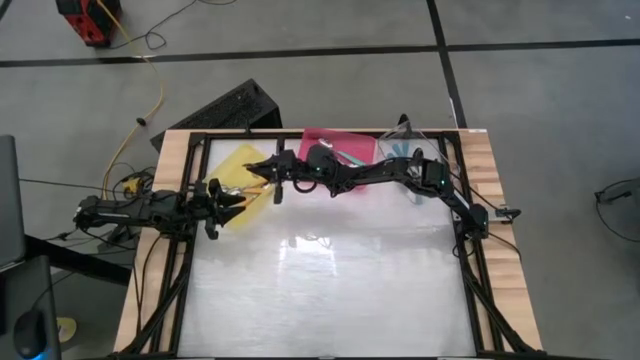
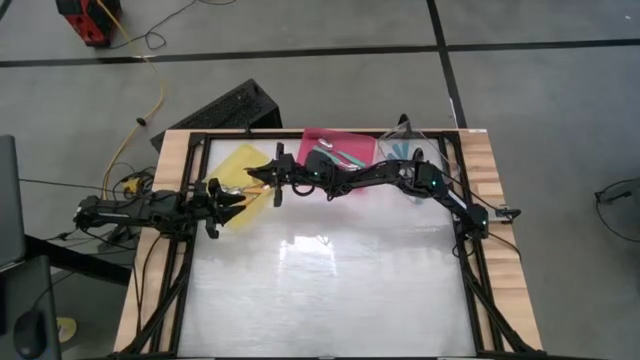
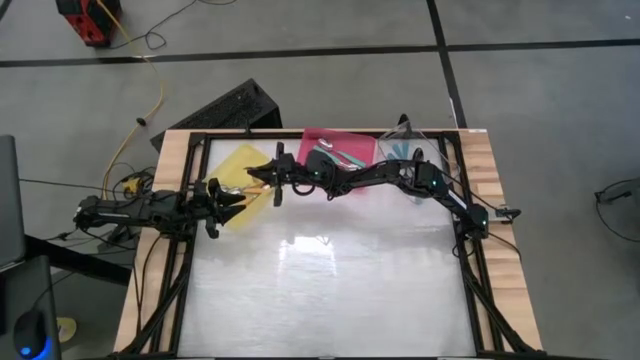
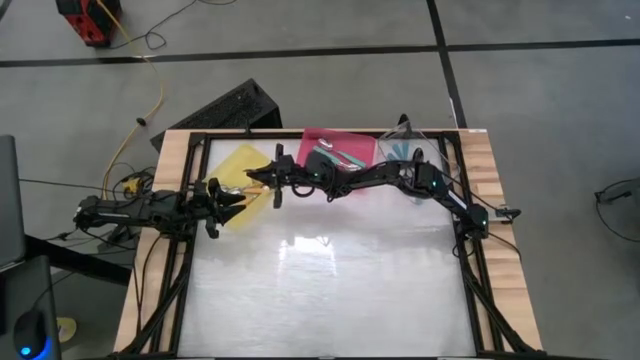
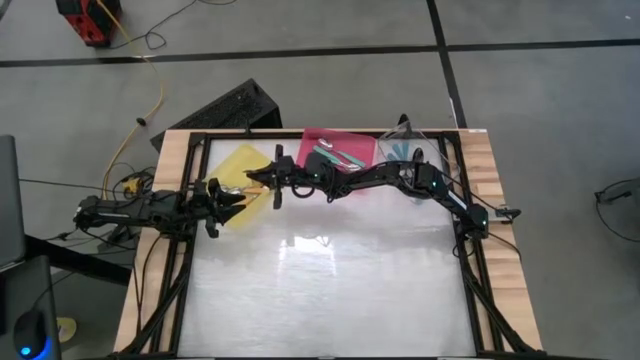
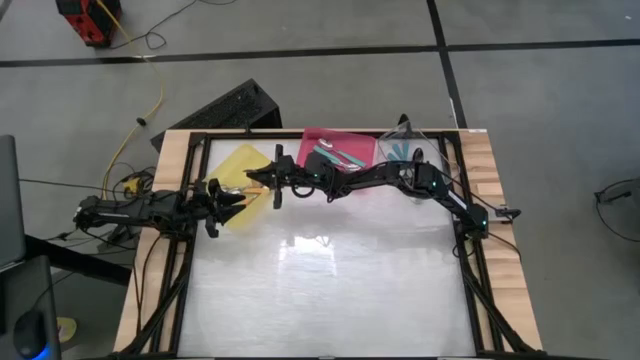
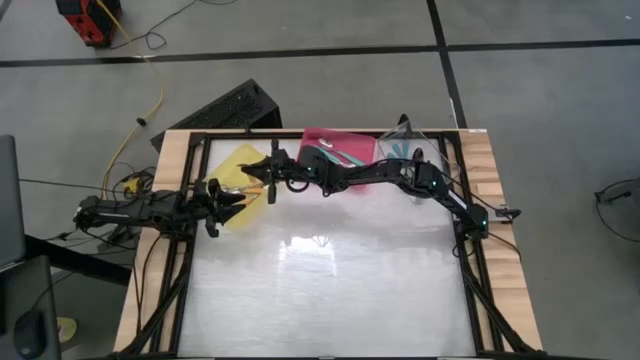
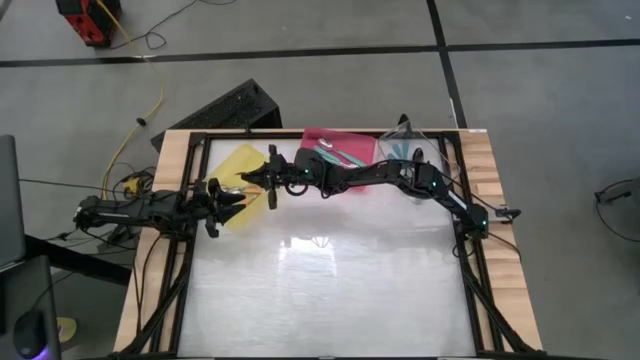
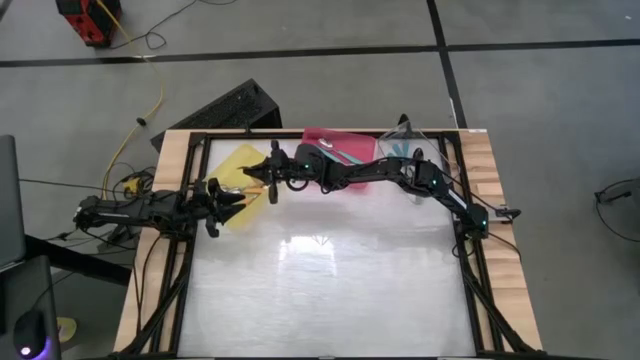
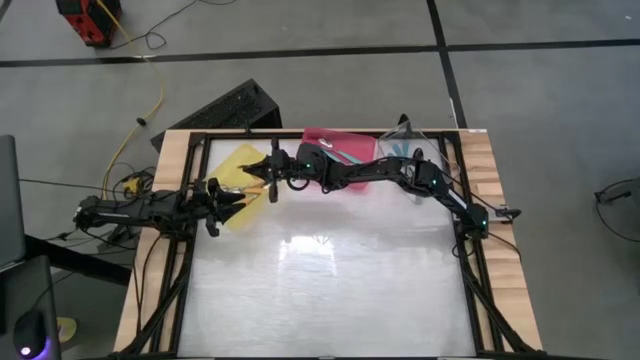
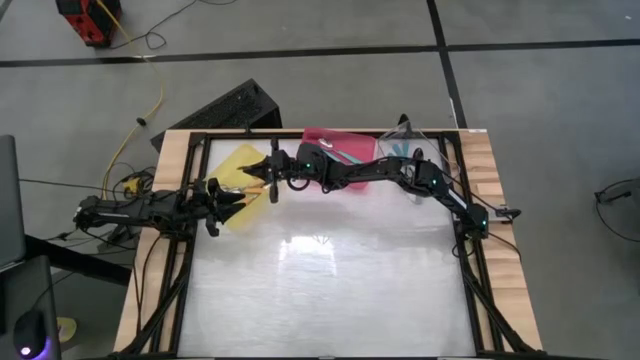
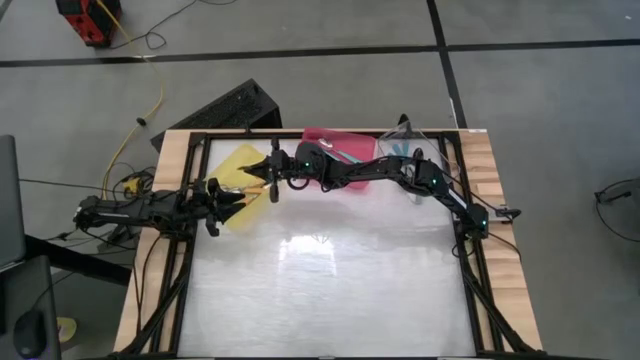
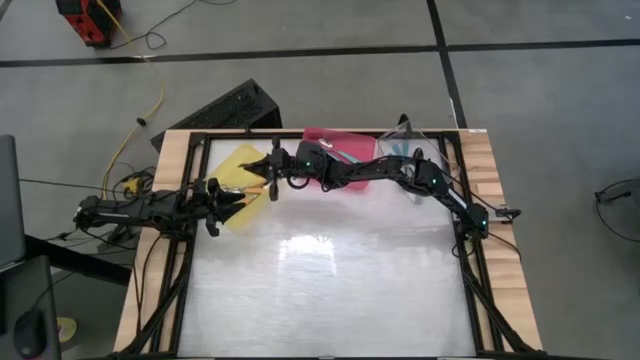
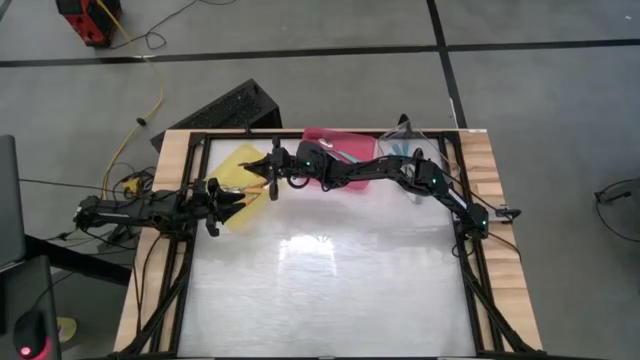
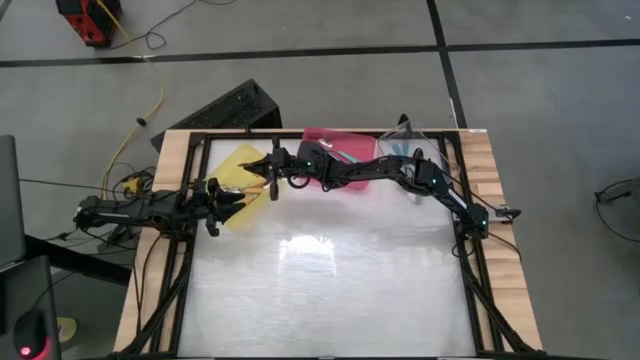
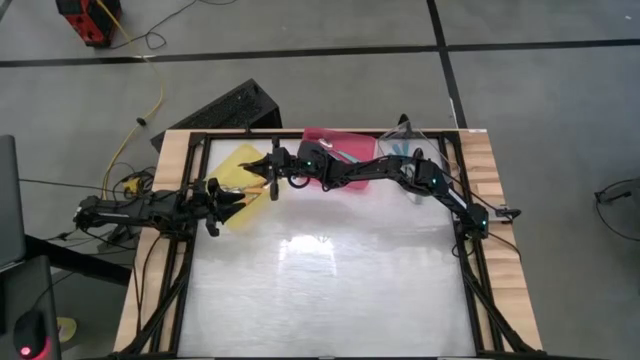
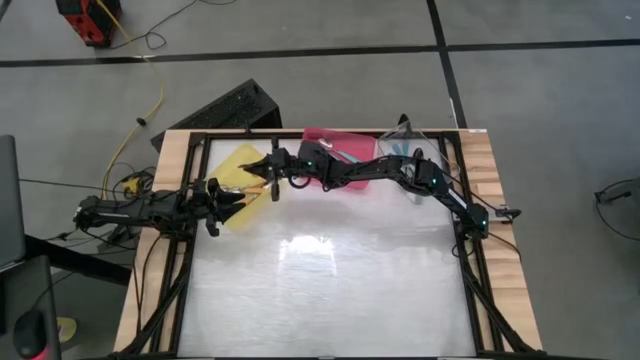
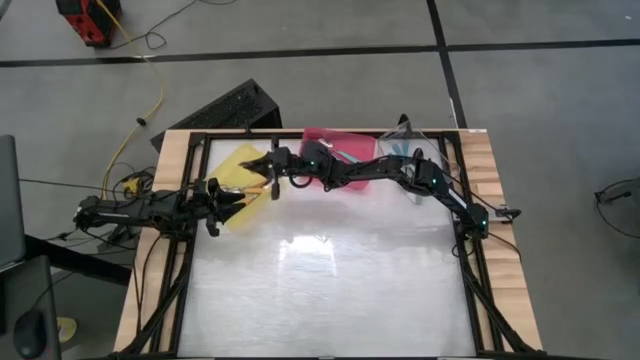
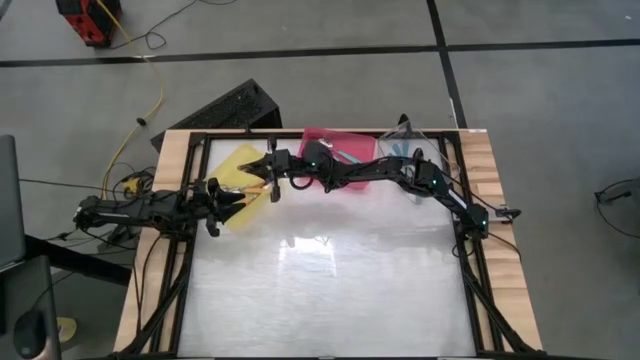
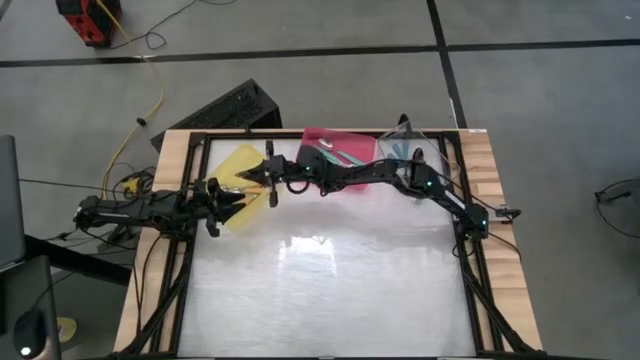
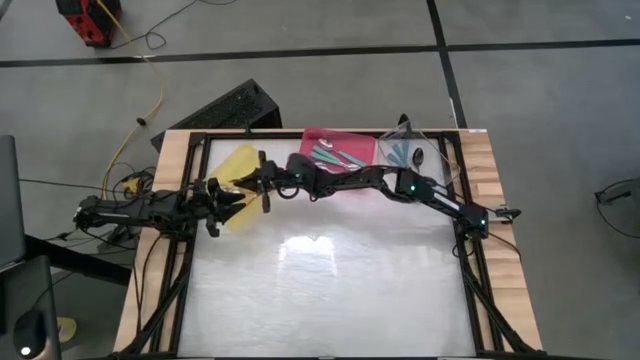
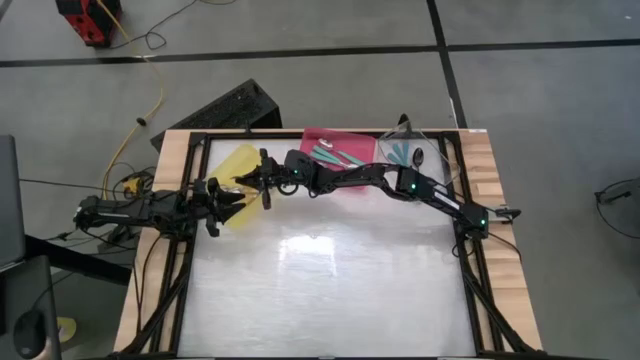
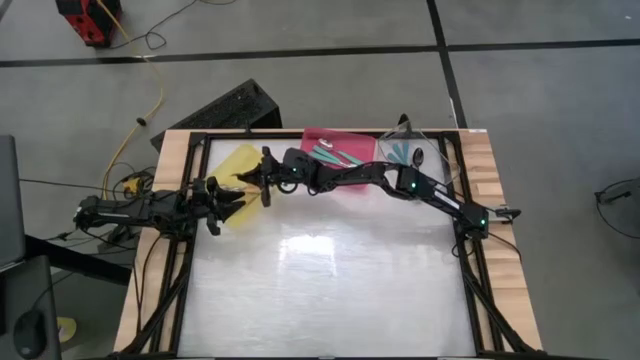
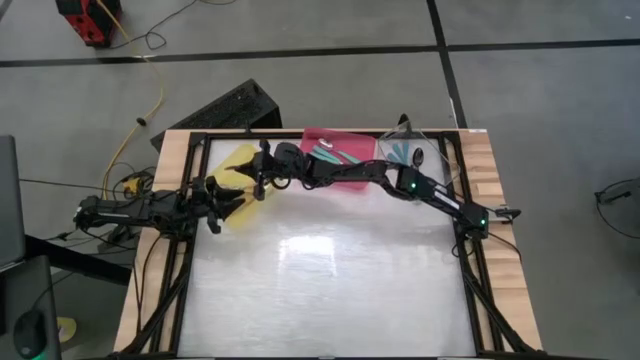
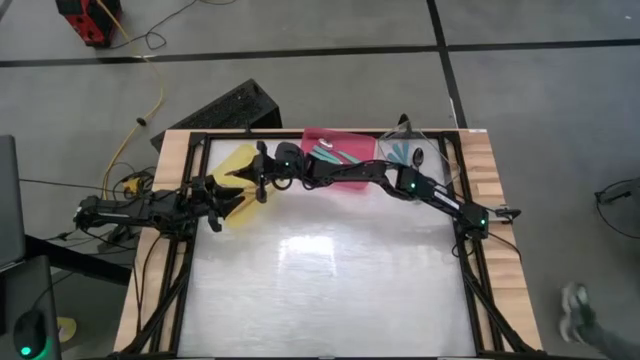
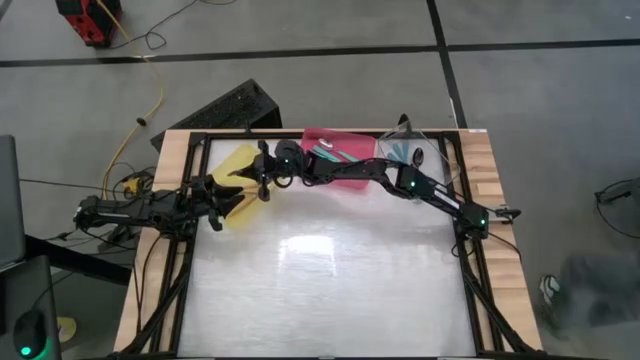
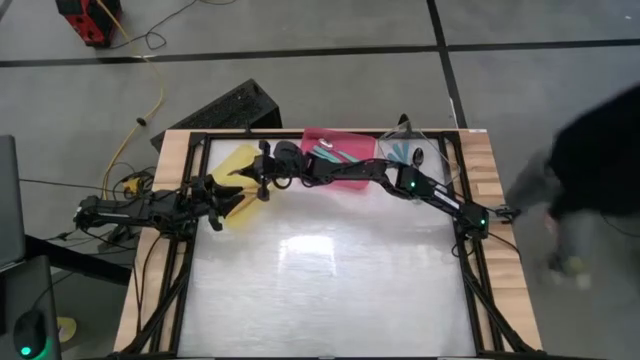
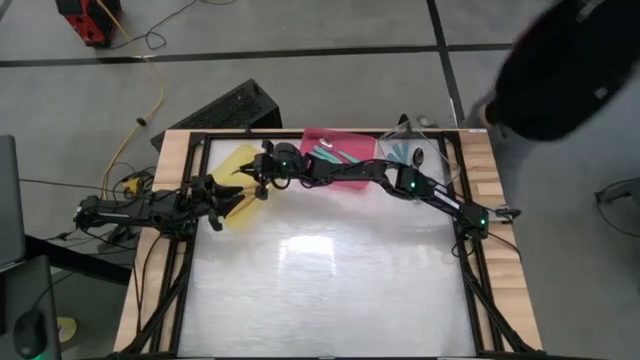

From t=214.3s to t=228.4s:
Task: Sort silverware by color (type)
Put the yellow spoon into the yellow bin

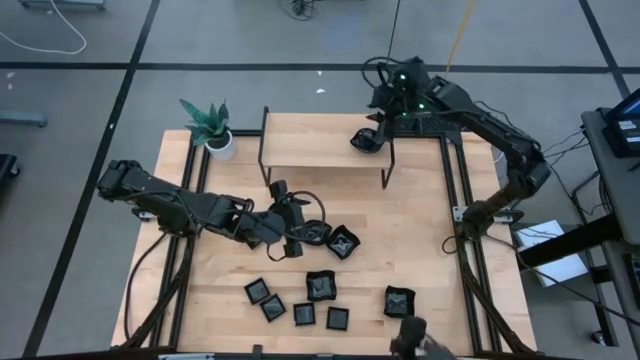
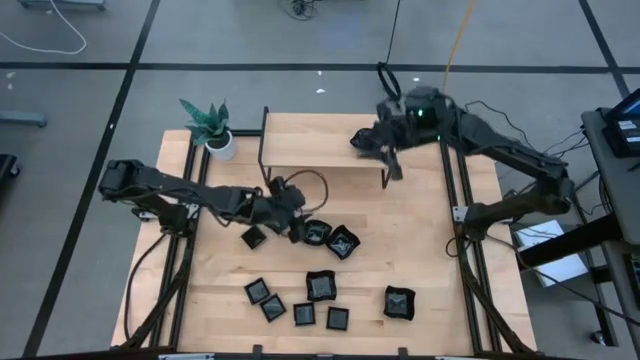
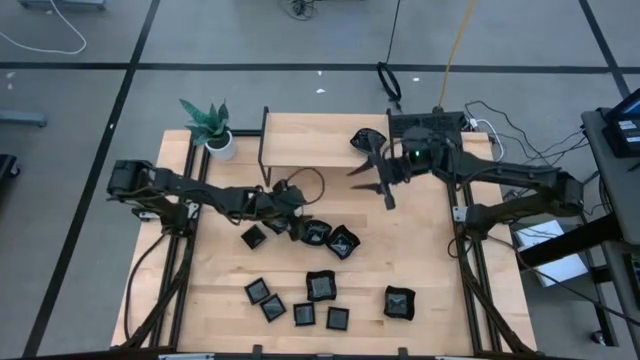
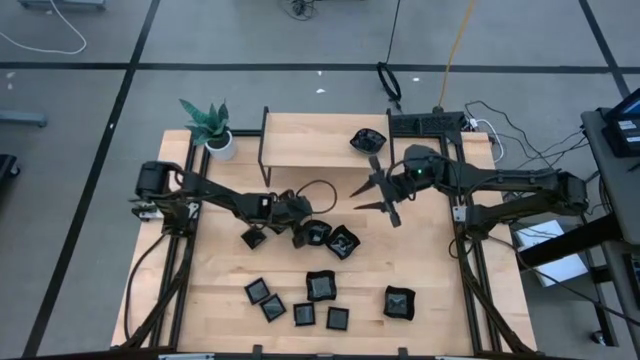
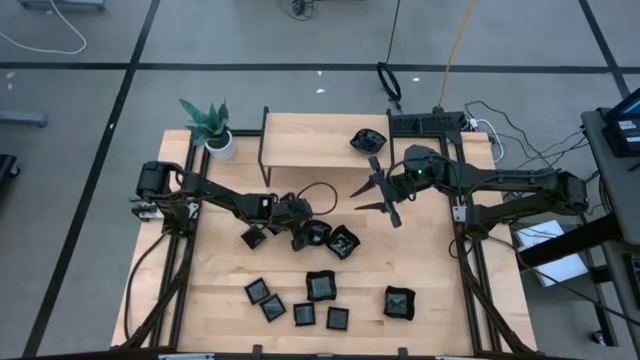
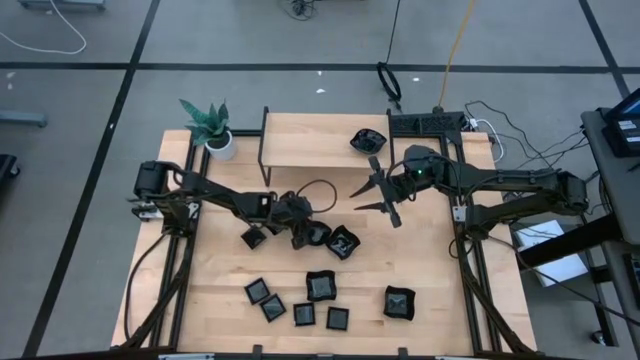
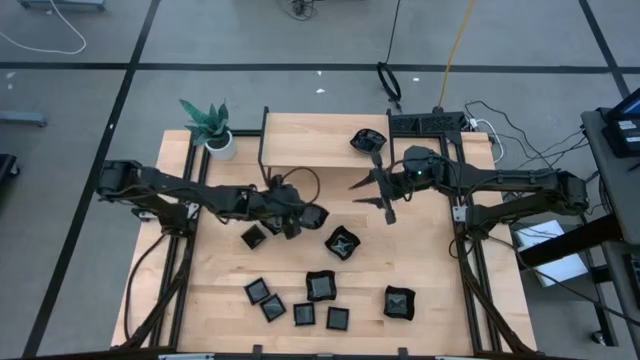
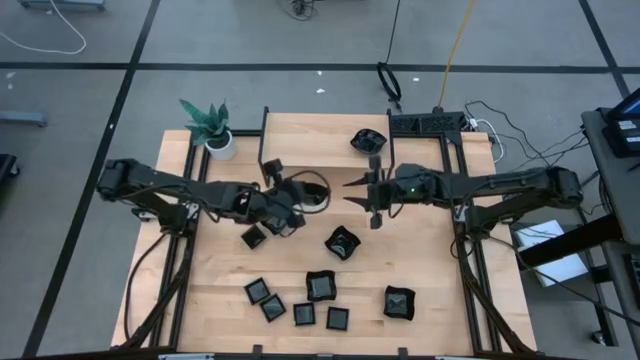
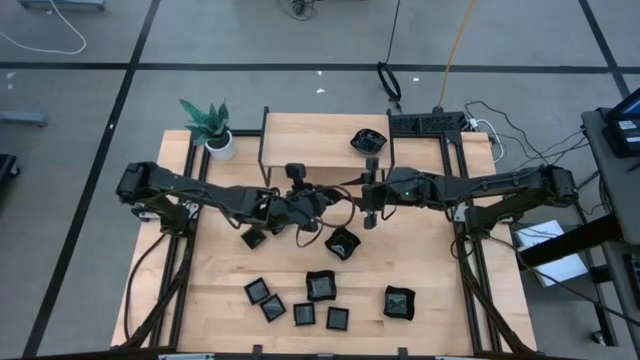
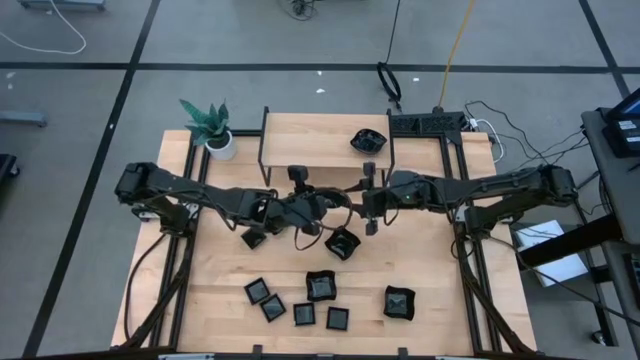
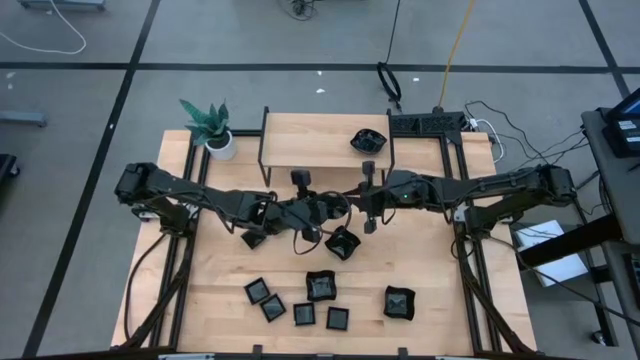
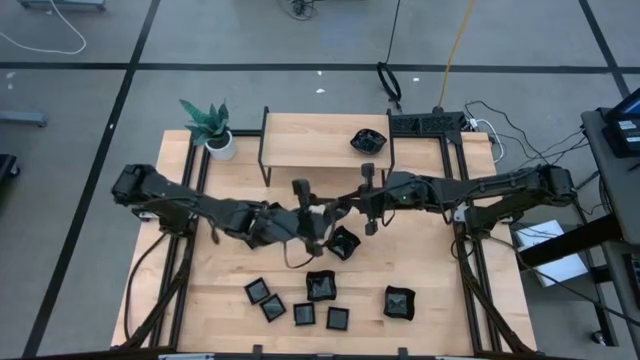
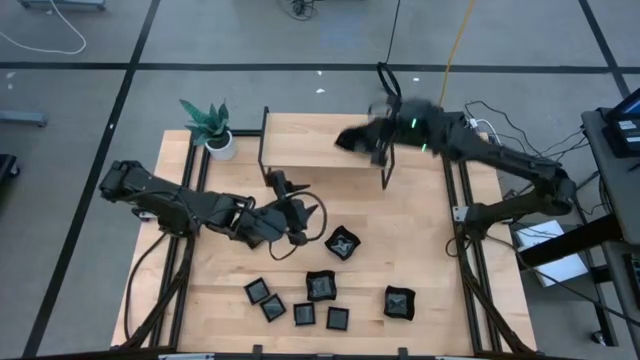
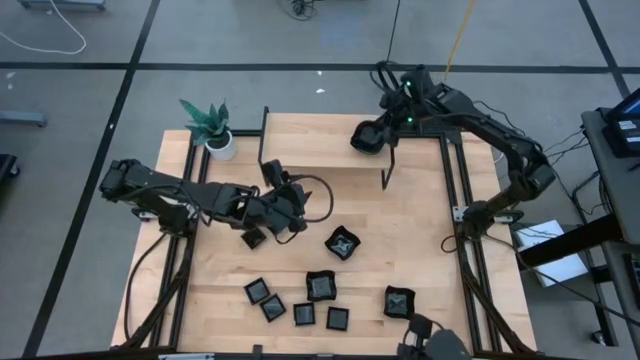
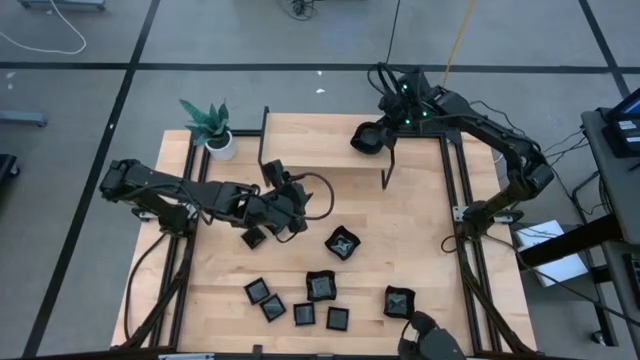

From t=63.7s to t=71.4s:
Task: Pick & Place Mini shaped plates
Stack the black leaf-shaped plate on top of the other black leaf-shaped plates on the shelf

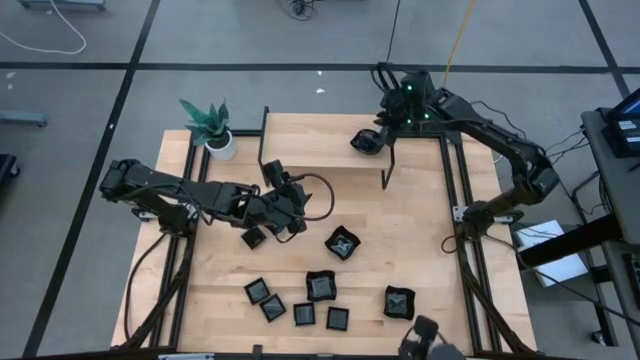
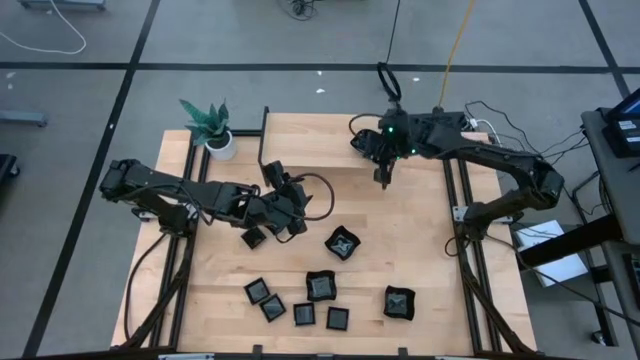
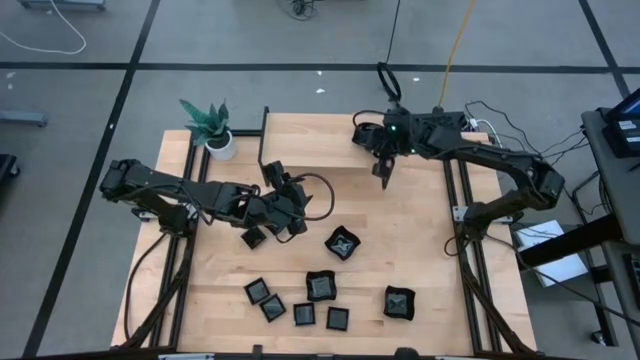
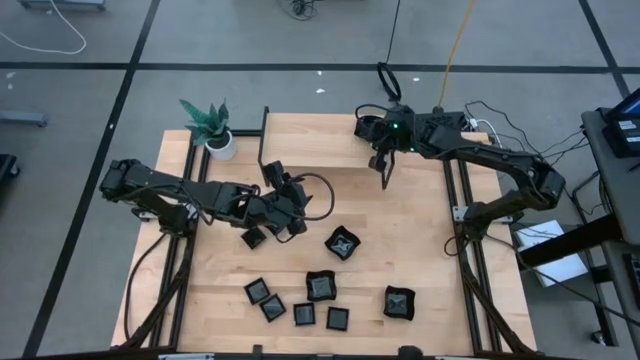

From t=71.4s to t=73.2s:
Adjust the stacked black square plates on the shelf
